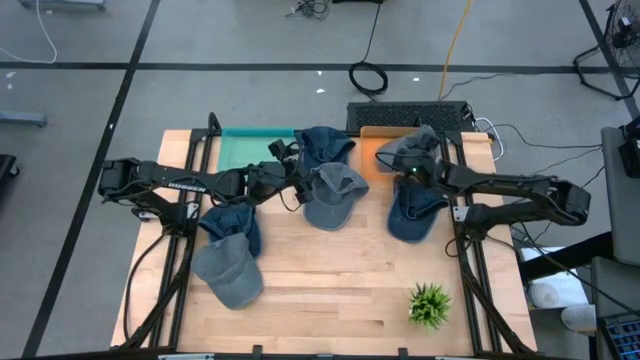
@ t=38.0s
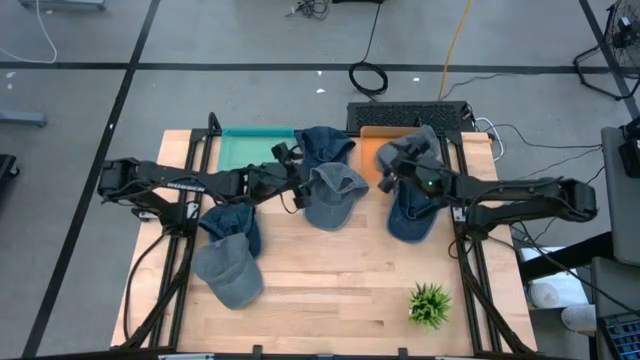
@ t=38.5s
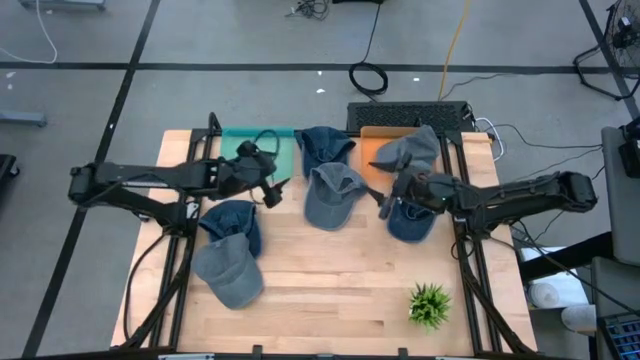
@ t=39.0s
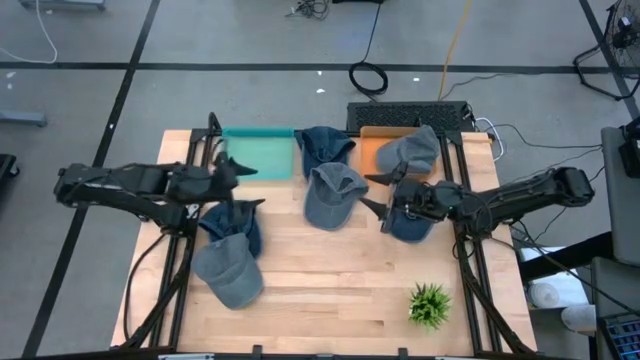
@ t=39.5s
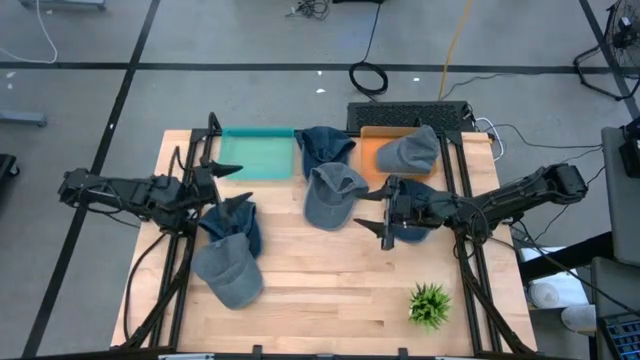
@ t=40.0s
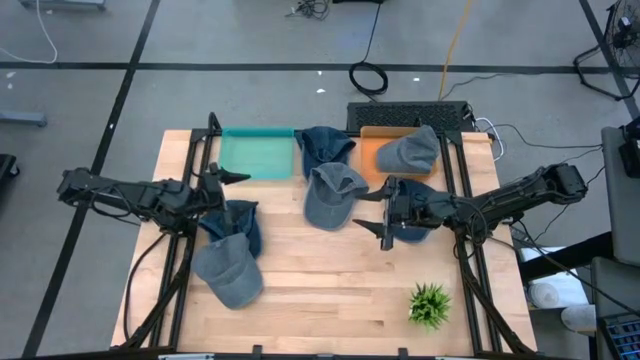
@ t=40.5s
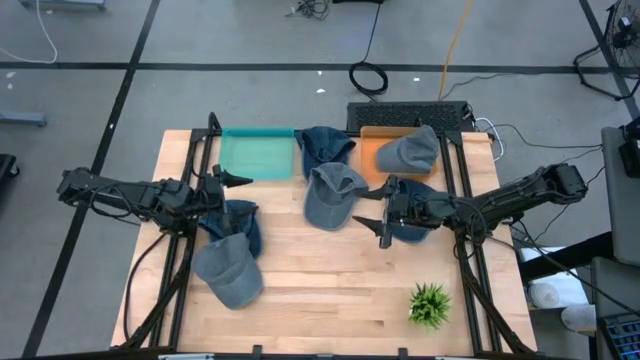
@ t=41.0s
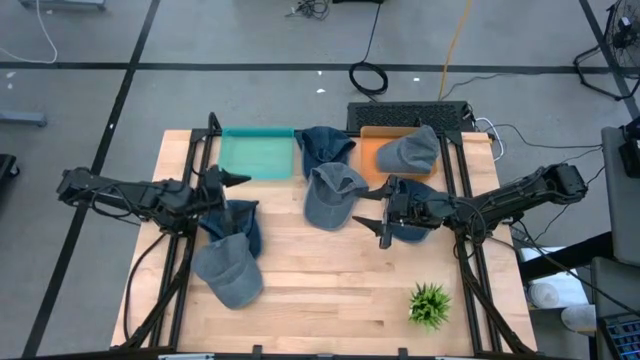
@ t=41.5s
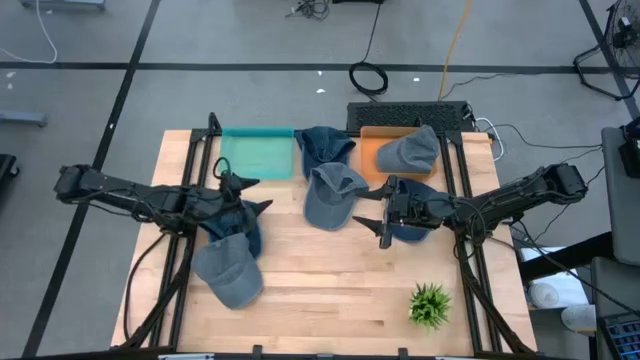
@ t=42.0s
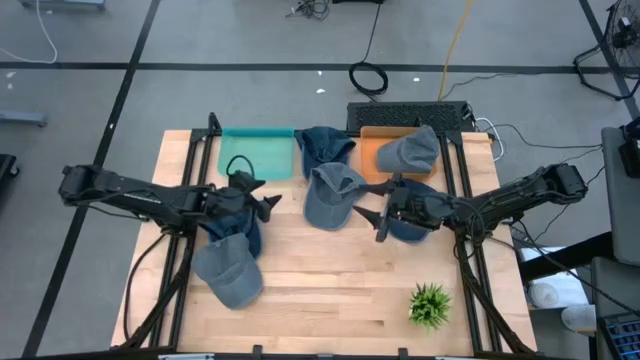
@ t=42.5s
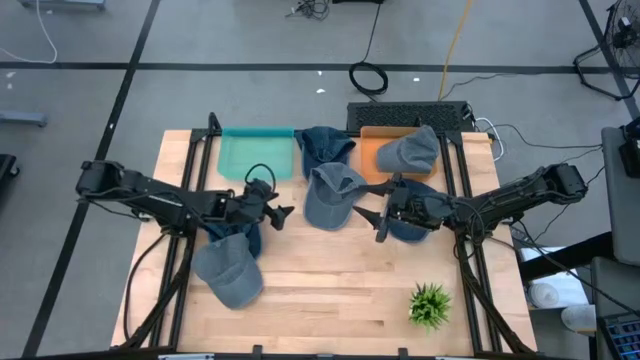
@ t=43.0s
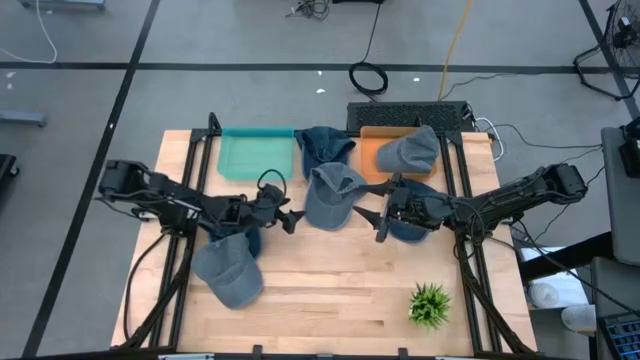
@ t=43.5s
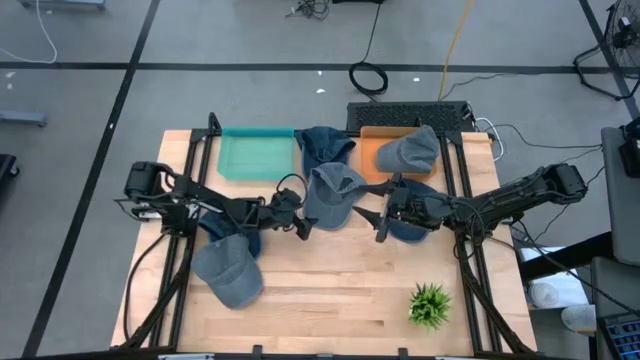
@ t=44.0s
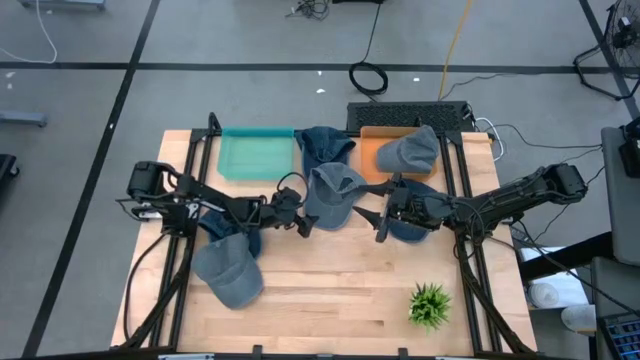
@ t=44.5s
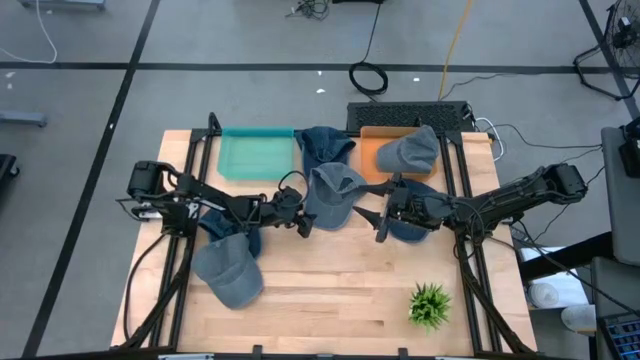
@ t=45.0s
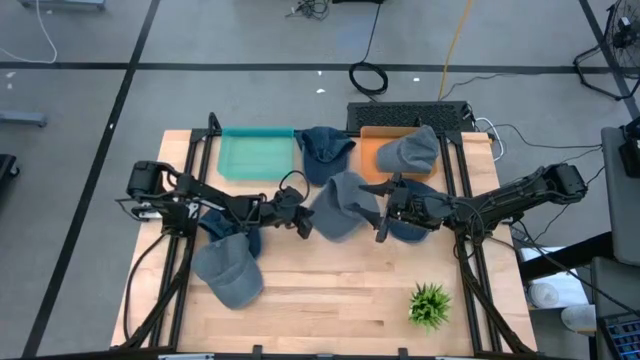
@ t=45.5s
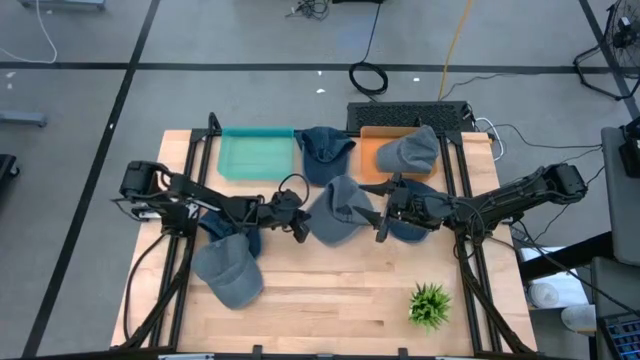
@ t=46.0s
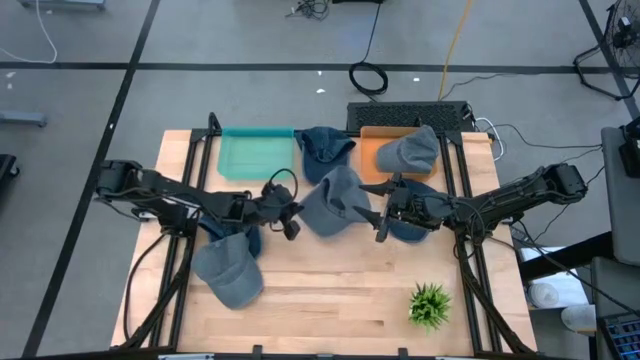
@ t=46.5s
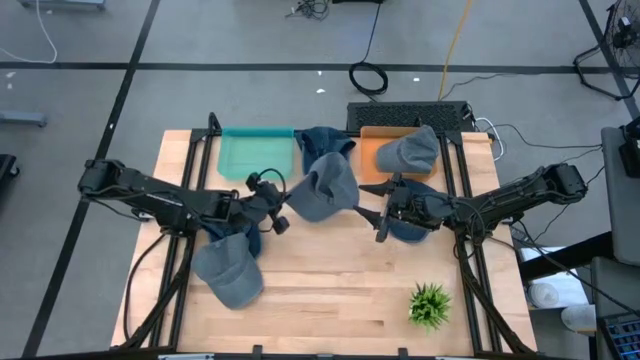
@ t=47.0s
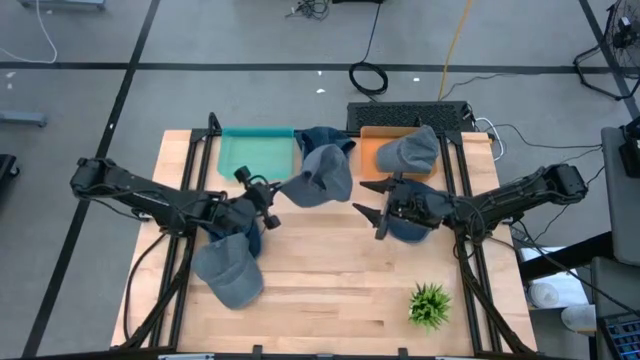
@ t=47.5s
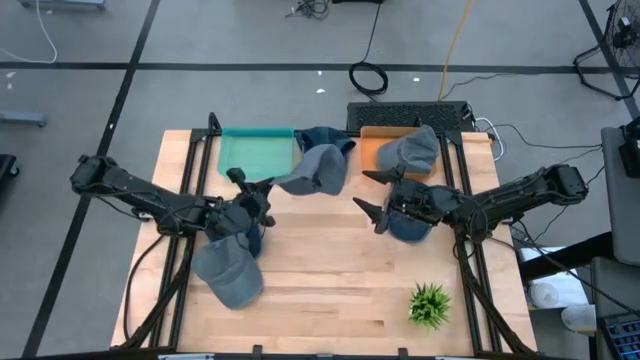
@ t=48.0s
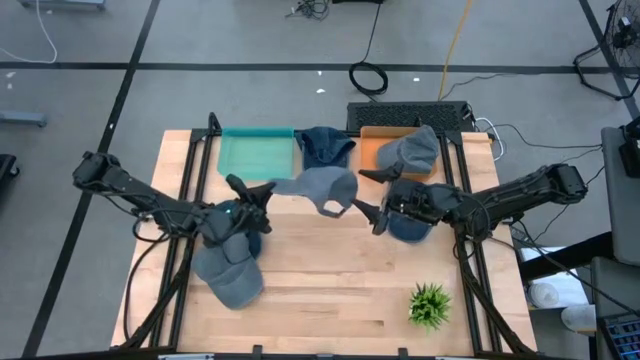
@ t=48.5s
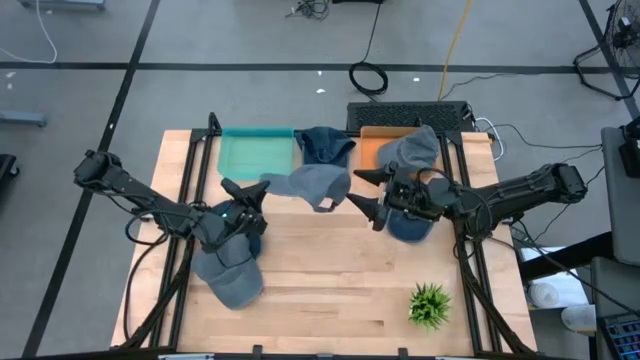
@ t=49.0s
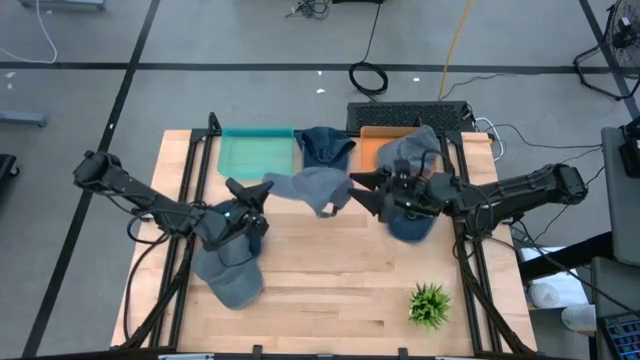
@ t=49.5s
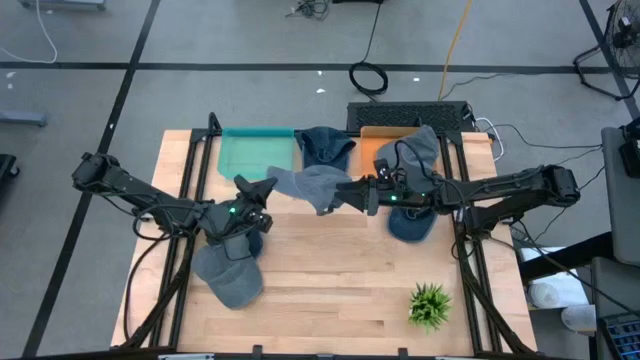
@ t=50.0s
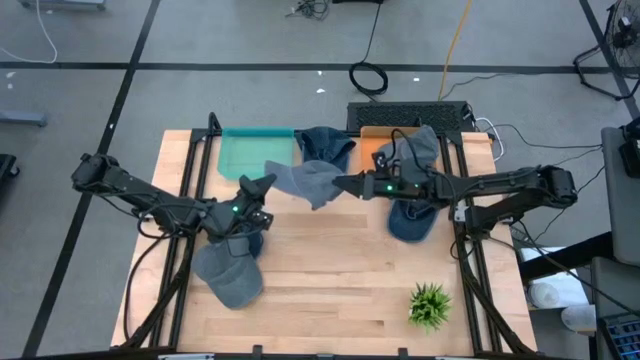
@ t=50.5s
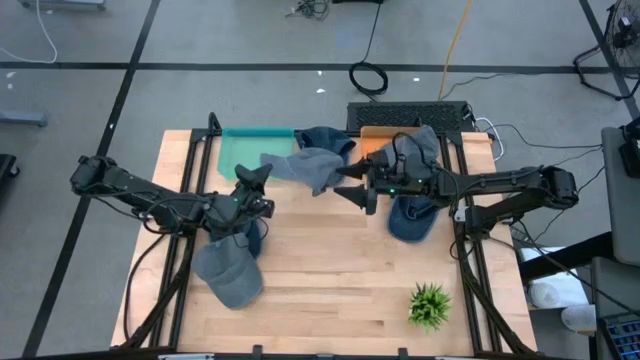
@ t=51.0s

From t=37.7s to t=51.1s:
Task: Pick & Place hat
Put the top gray cap into the orange bin

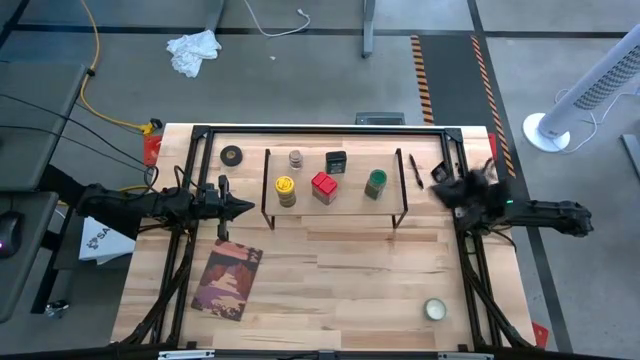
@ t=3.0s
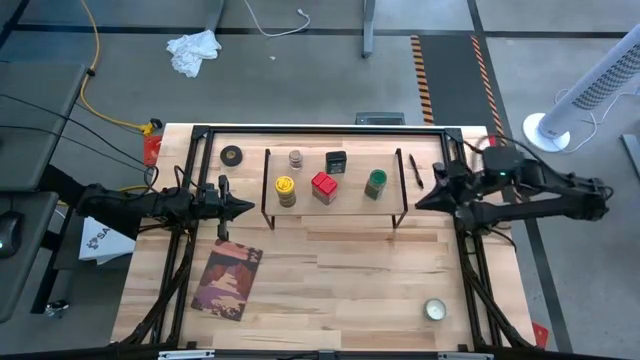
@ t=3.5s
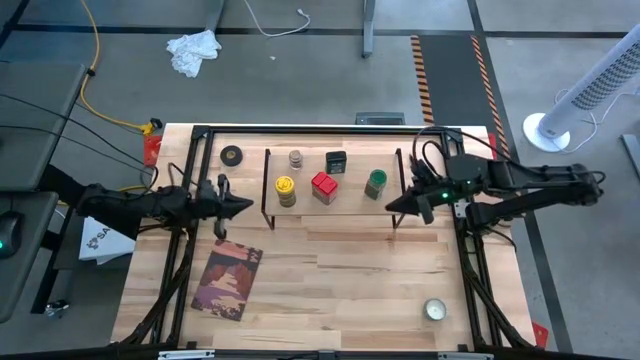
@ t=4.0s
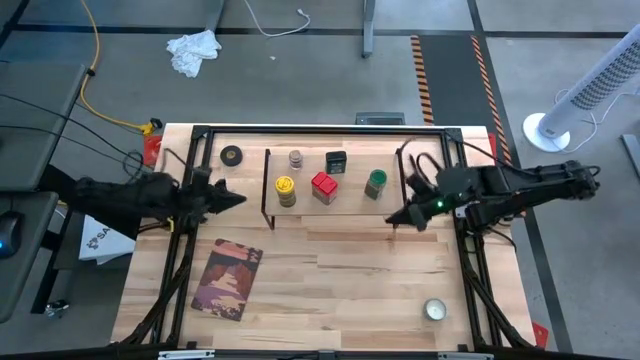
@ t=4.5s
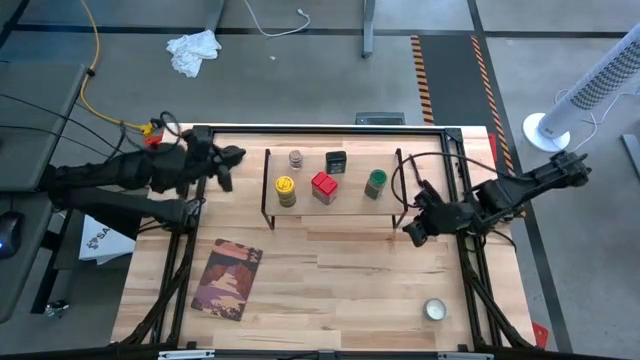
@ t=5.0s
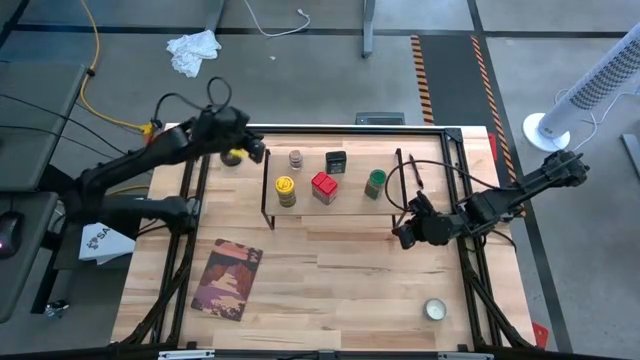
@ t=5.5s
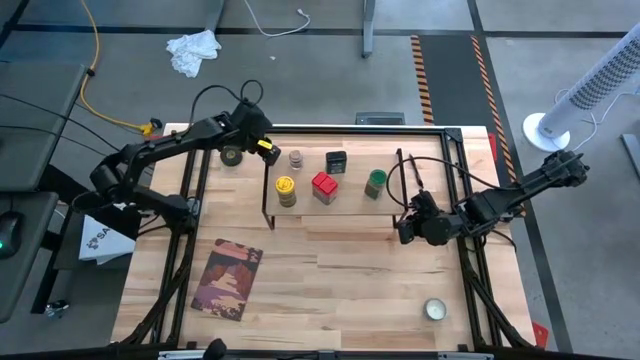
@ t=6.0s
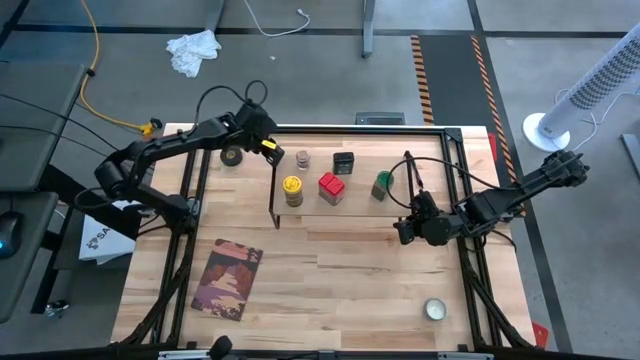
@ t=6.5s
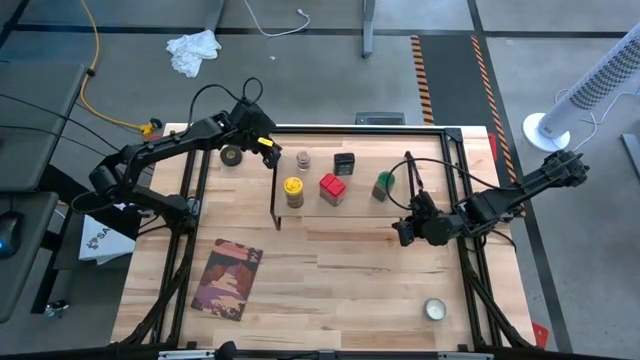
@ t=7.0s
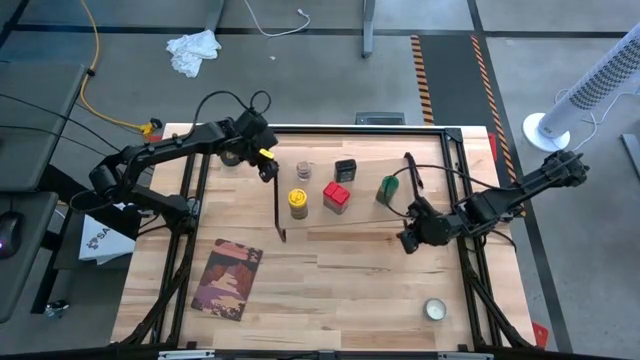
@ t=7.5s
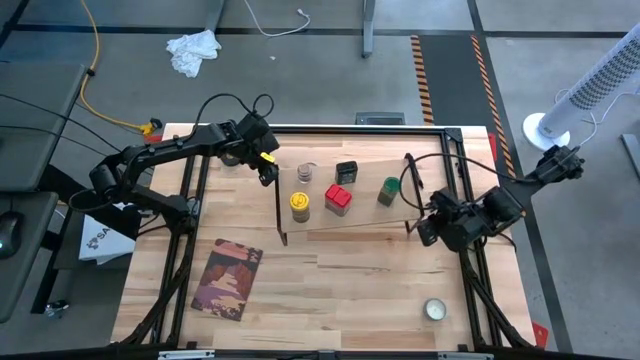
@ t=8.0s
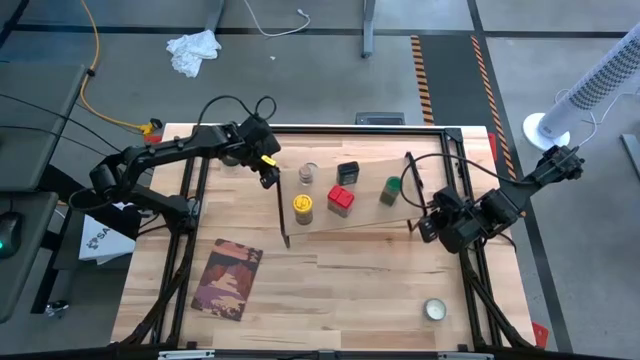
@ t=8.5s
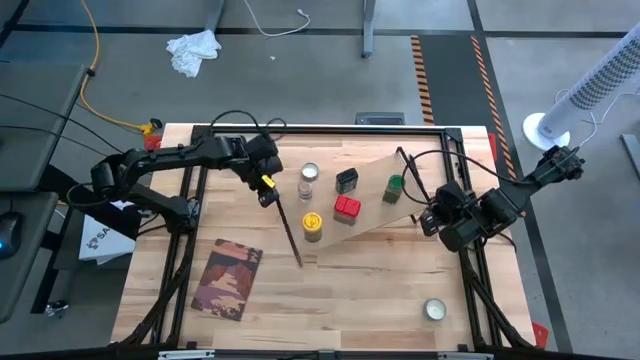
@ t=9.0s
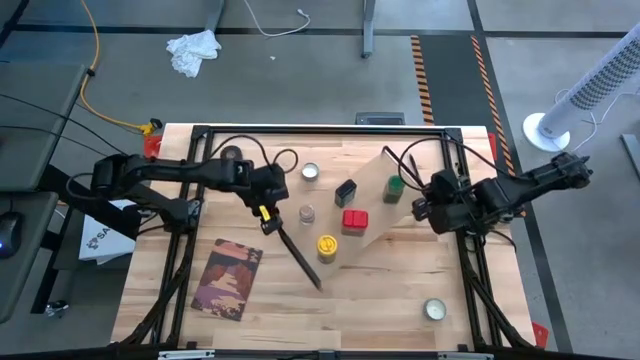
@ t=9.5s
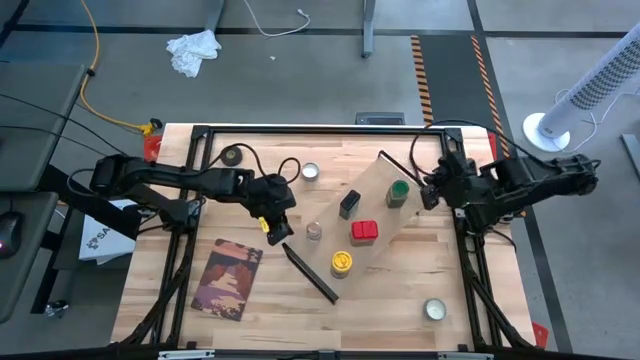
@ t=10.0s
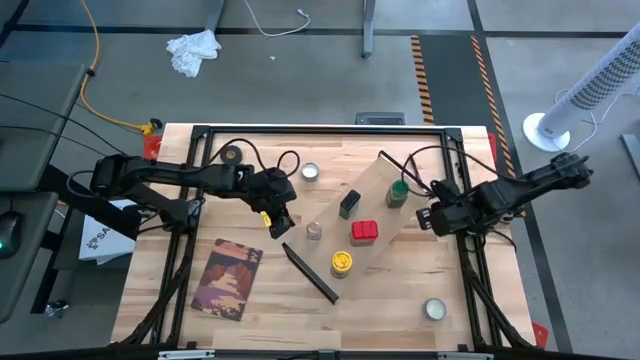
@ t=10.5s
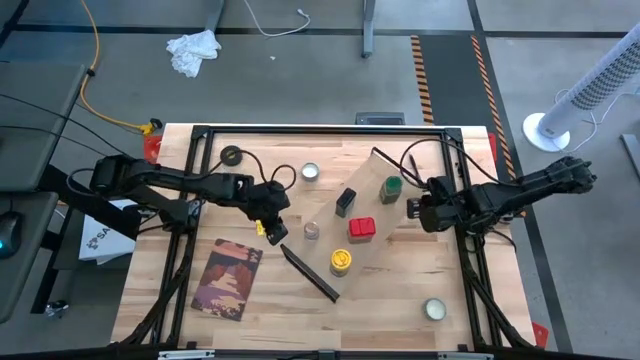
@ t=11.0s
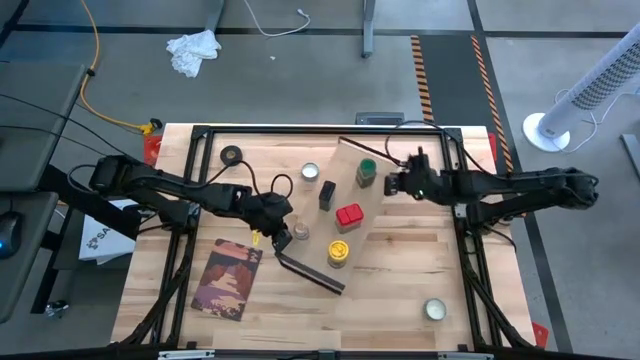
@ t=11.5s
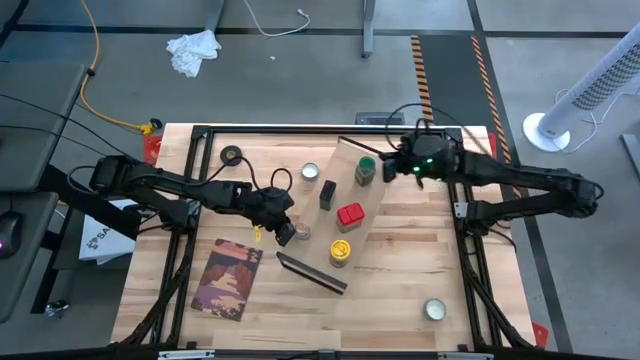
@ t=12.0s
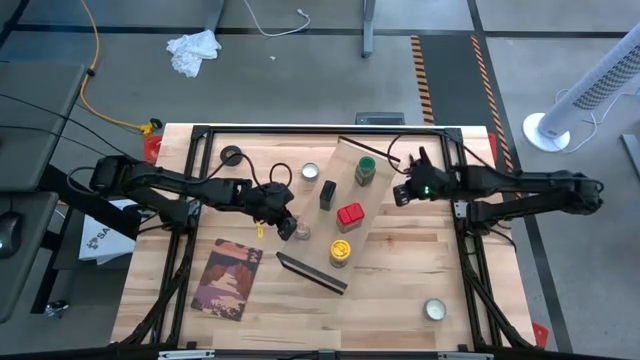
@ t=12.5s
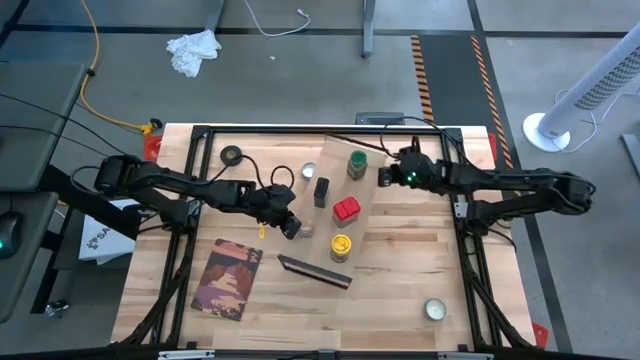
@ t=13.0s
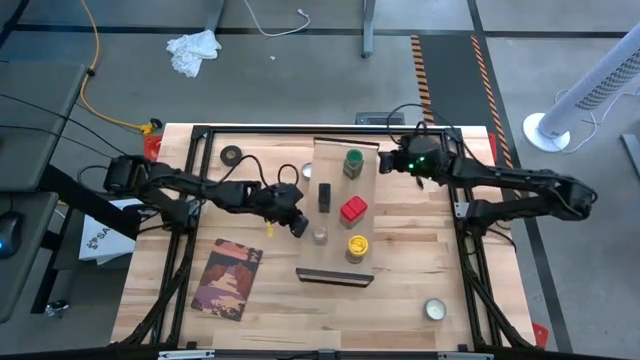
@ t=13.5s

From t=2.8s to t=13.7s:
Task: Shelf spices
Move the shelf a quarter turn to the right on the table
